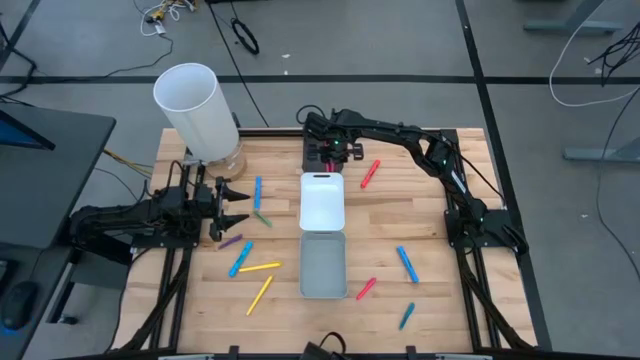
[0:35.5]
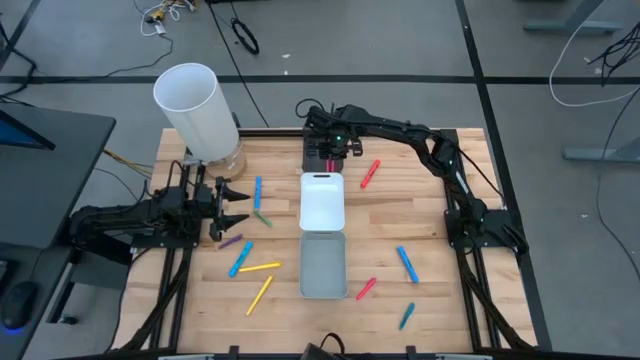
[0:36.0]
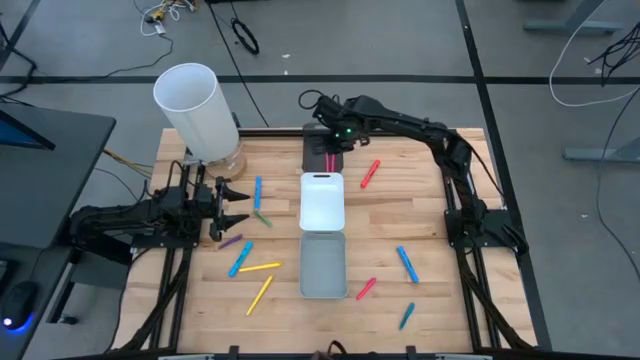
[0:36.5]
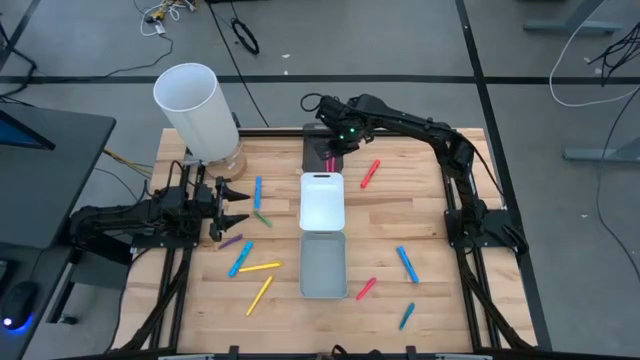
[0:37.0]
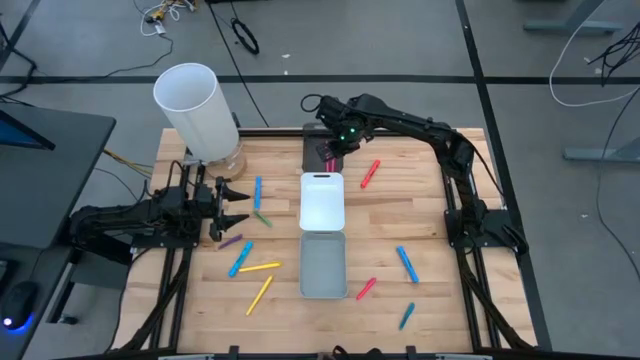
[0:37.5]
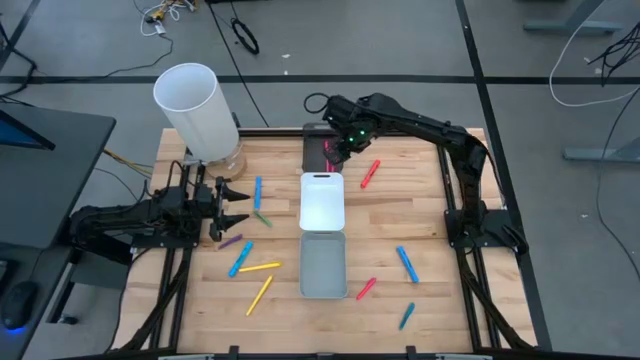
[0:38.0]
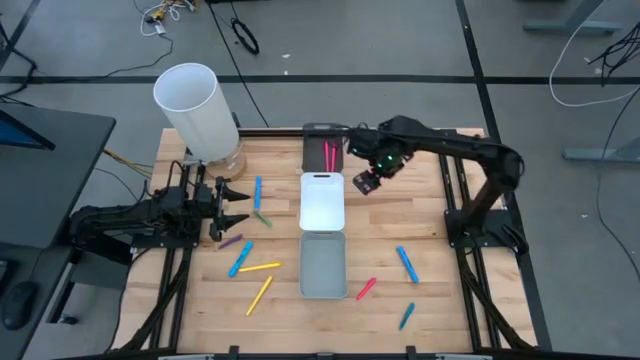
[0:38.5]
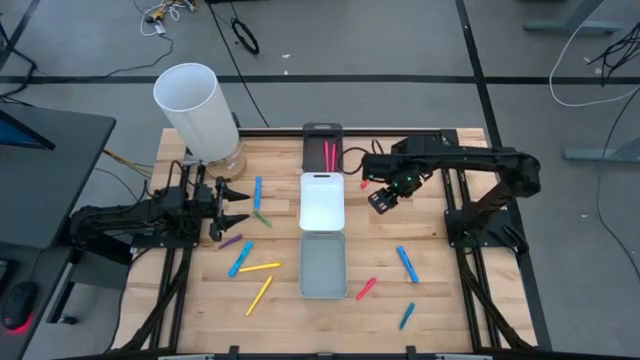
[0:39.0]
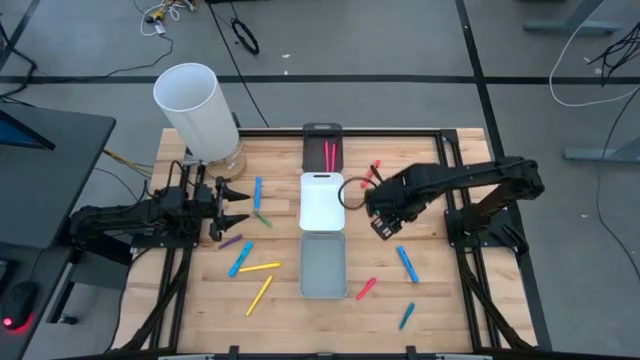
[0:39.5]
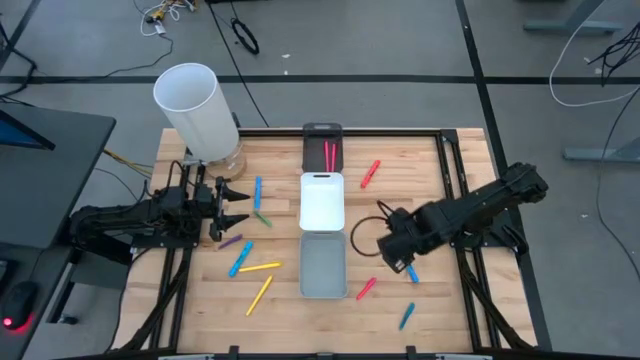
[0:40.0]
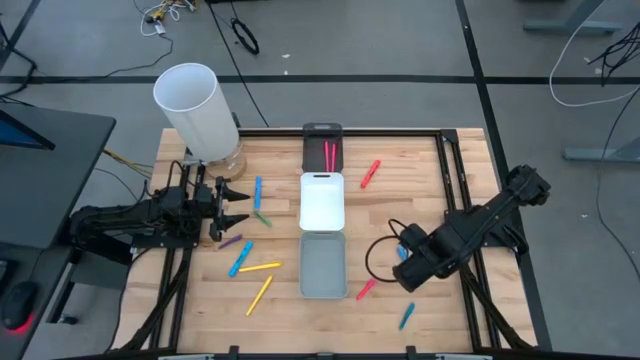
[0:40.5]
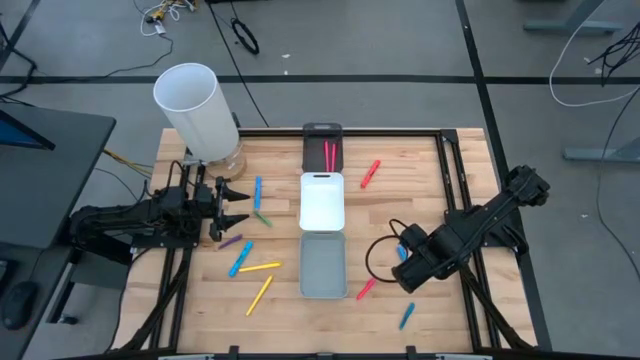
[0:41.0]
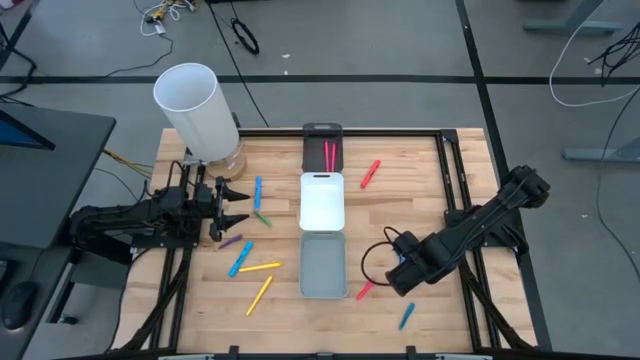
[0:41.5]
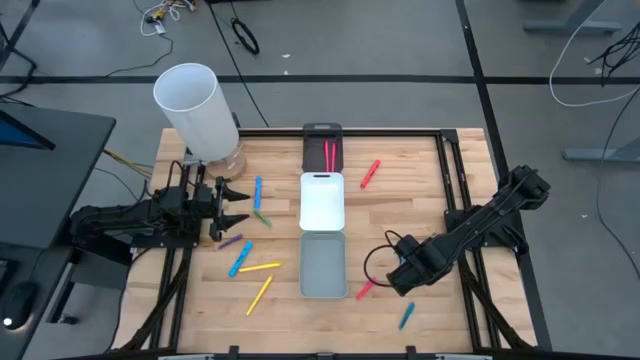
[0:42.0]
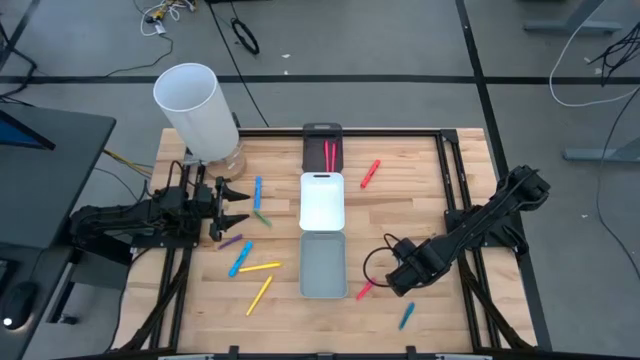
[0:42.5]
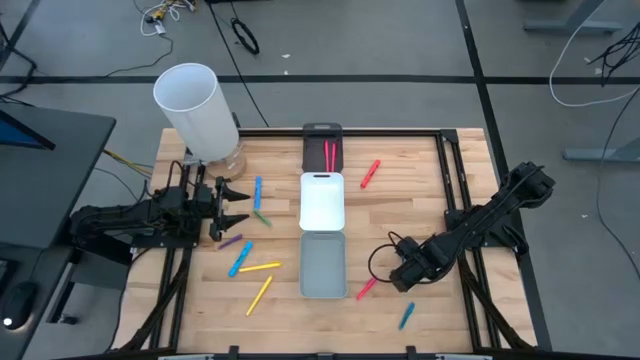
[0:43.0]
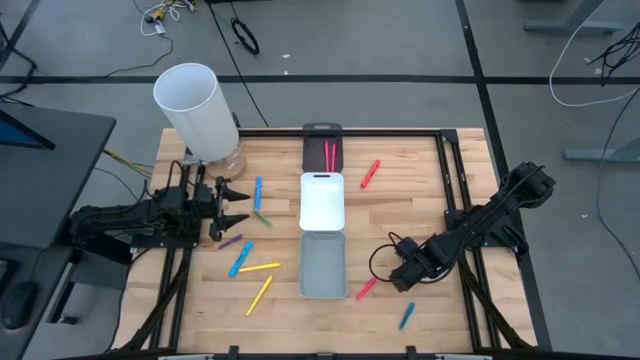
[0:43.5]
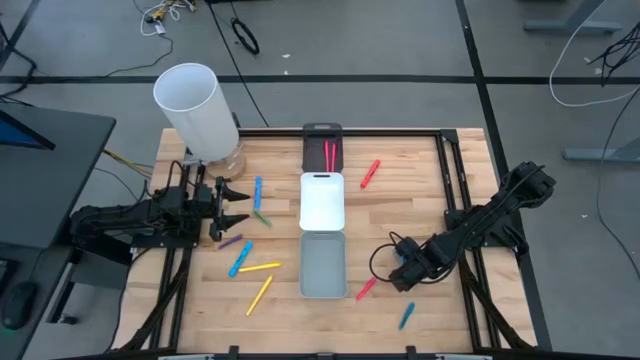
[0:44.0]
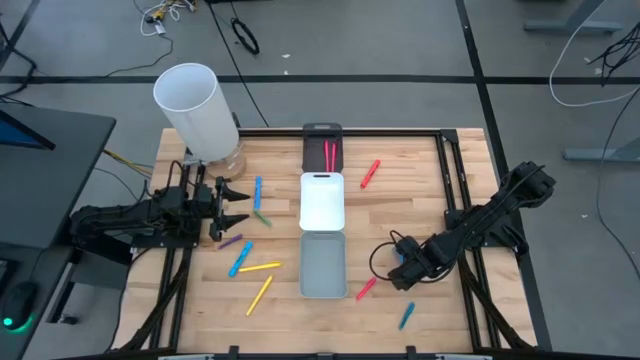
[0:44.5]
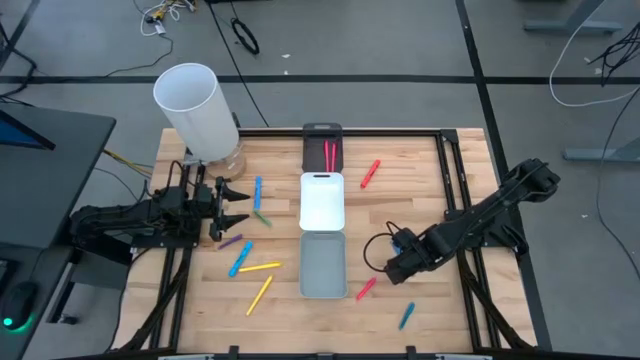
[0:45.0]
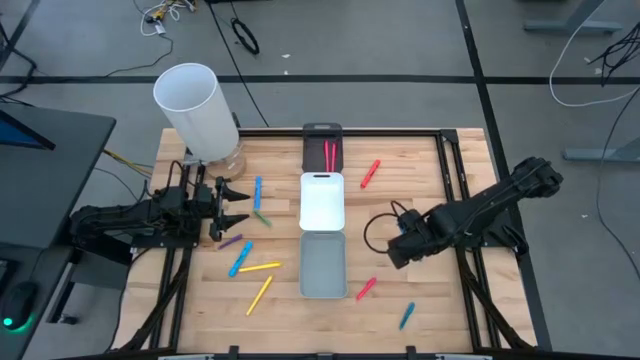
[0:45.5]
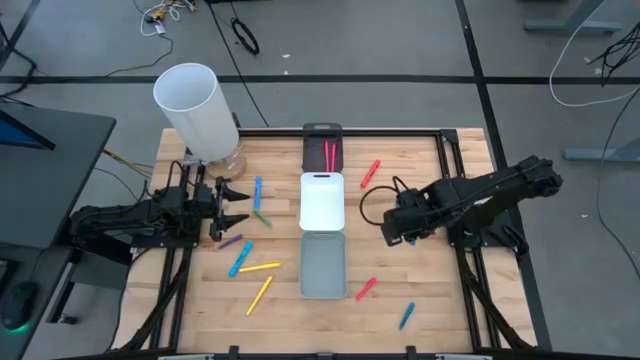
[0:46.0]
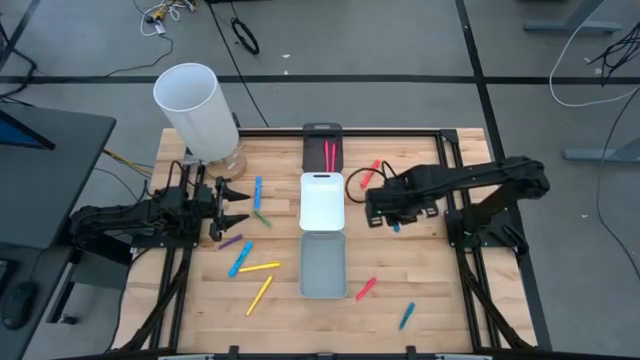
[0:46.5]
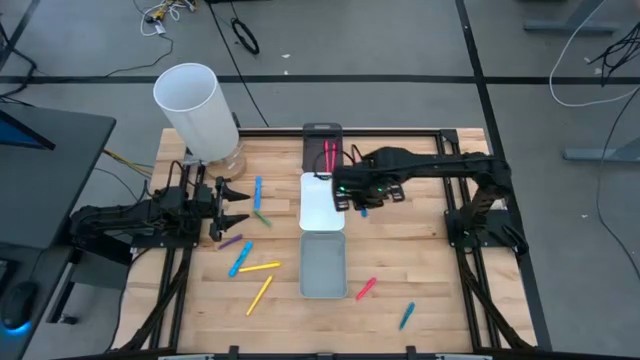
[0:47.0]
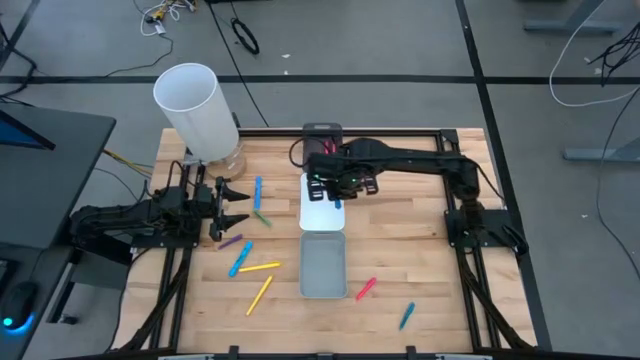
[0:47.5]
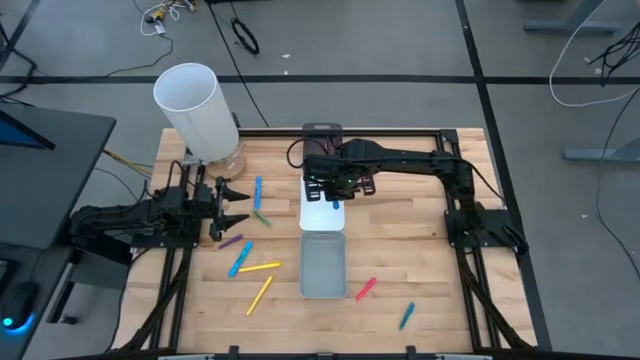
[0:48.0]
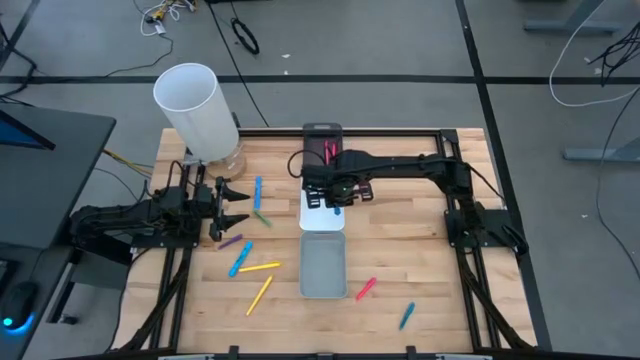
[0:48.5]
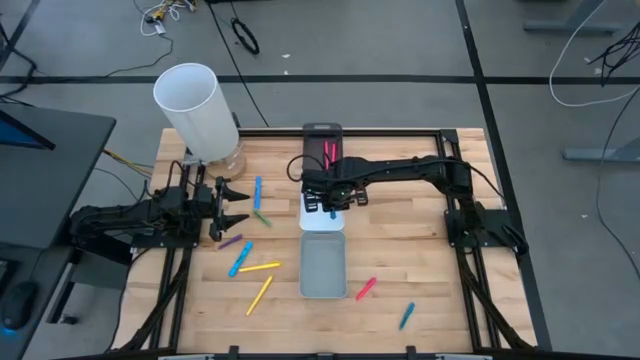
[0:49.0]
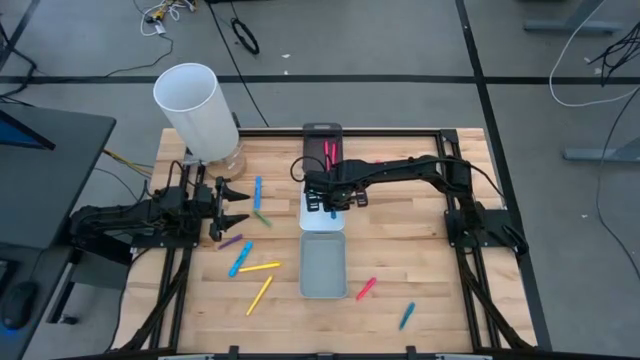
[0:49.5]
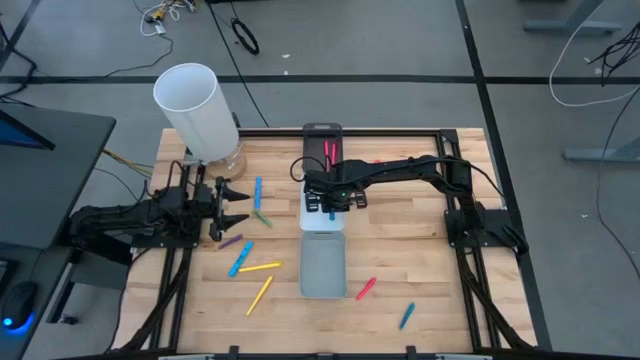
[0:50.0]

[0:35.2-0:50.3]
Task: Pick & Place Markers
Put the blue highlighter pen into the white bin
